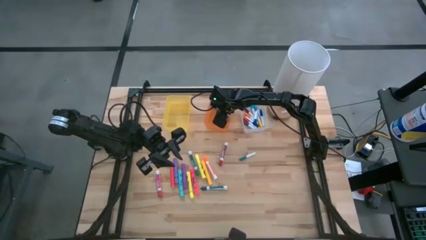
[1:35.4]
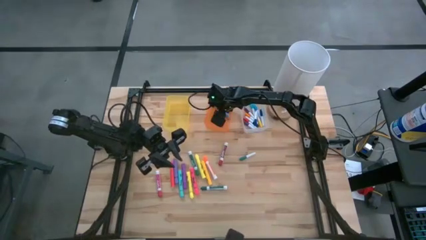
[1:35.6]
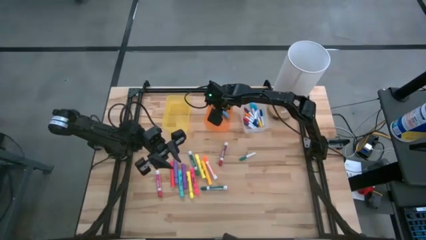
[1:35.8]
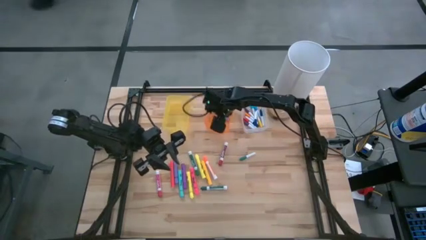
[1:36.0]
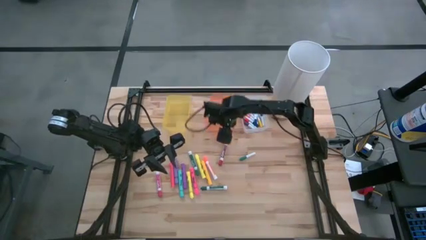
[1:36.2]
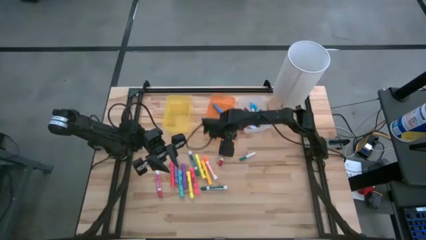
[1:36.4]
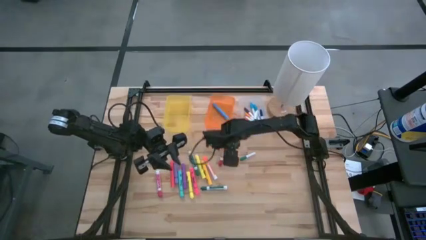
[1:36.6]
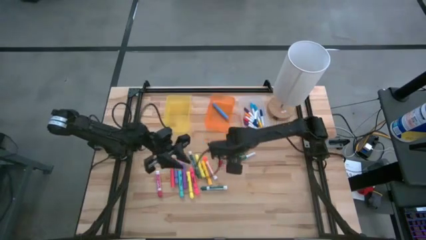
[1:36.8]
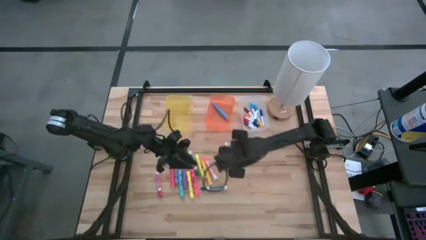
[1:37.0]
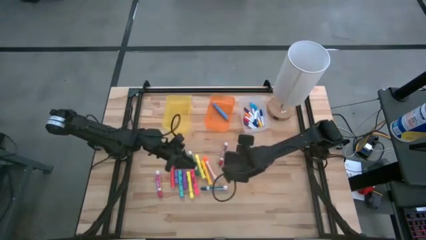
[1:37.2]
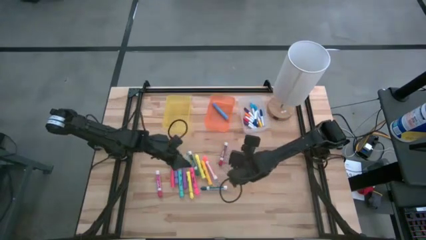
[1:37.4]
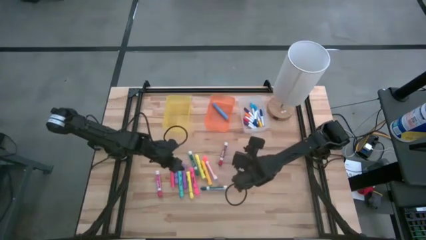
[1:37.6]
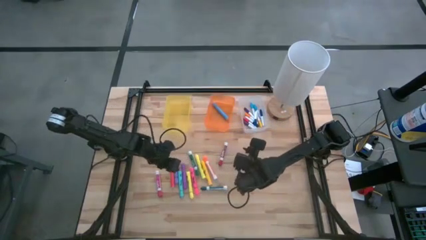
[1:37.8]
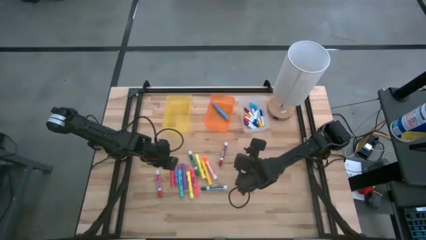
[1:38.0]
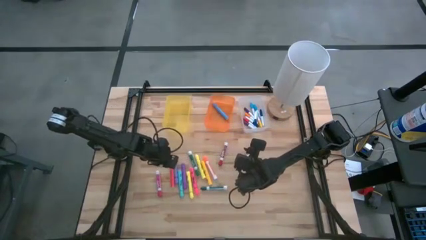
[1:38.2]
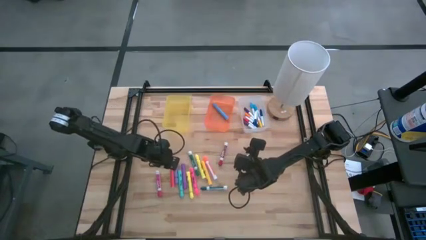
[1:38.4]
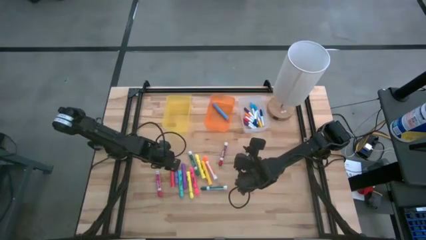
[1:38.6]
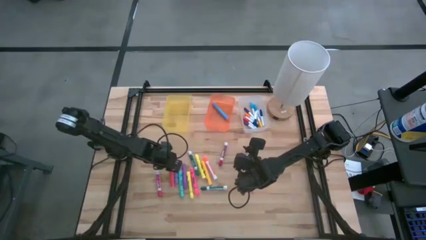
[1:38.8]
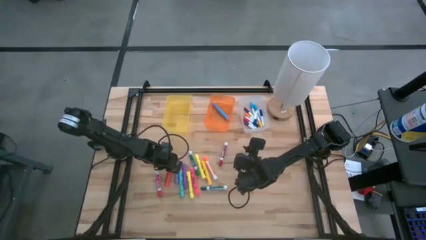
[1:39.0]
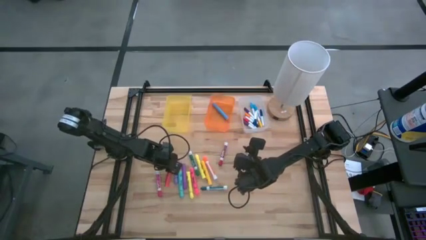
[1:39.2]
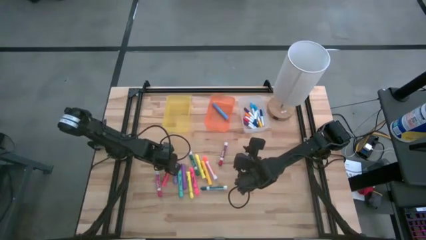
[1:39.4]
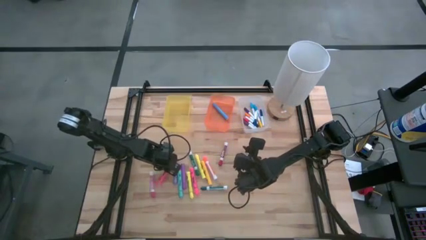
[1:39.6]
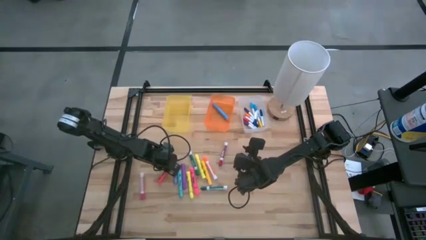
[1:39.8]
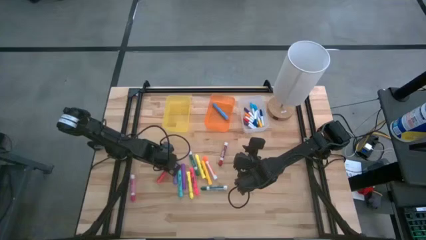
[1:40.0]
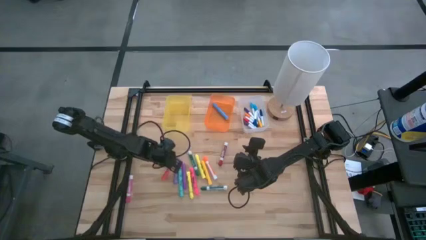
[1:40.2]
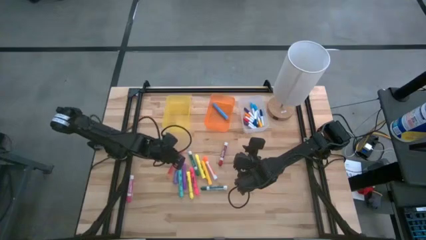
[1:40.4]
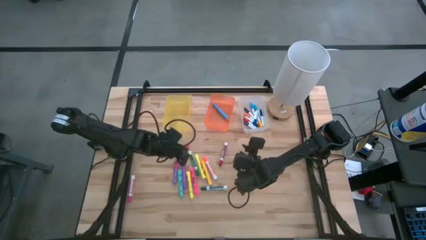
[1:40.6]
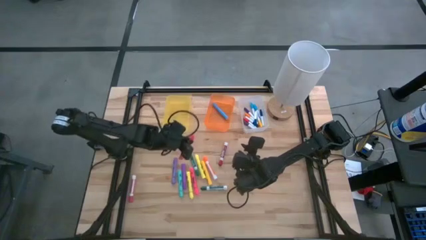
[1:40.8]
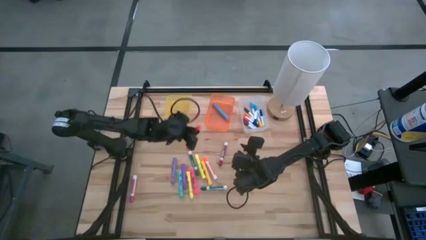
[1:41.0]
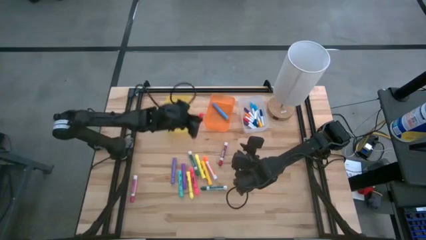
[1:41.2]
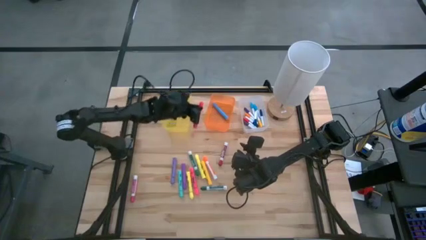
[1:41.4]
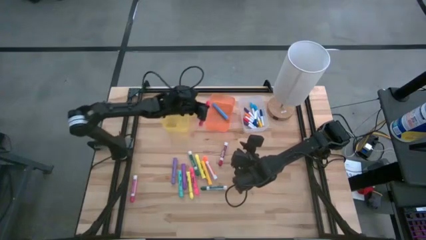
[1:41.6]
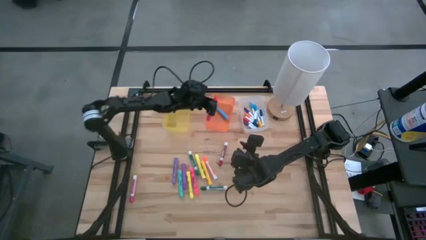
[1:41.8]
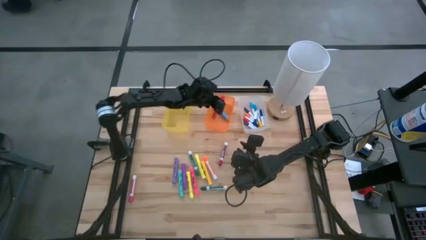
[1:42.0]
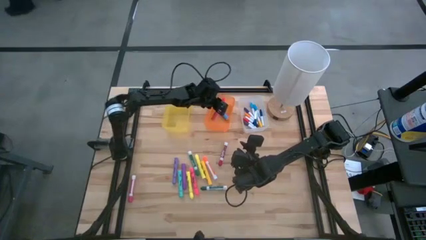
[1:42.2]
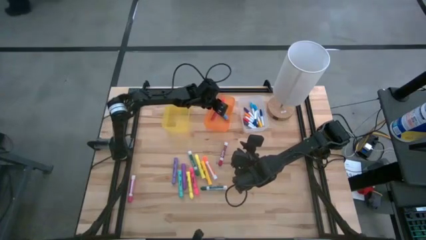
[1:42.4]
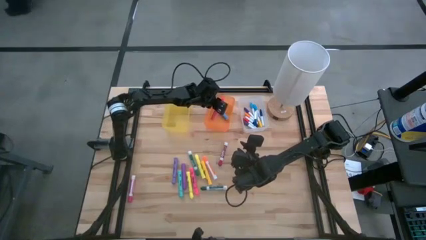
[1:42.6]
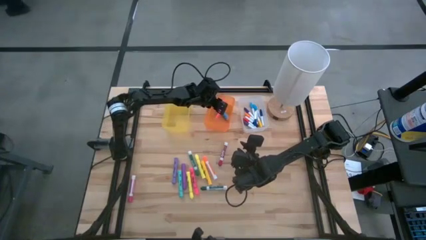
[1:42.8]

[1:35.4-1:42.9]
Task: Pick & Place Markers
Put the orange highlighter into the orange bin

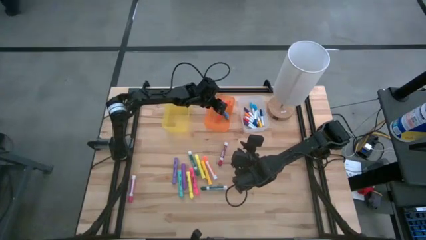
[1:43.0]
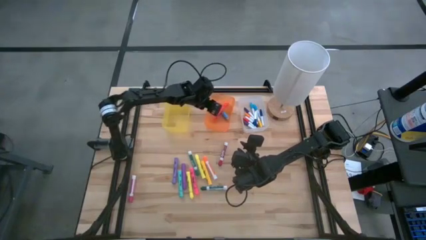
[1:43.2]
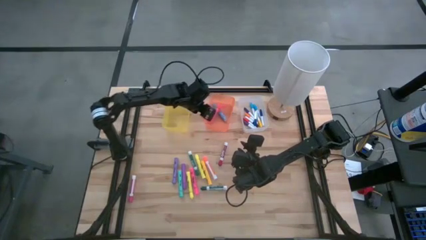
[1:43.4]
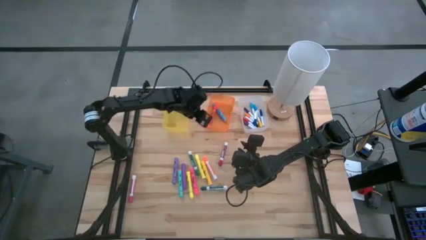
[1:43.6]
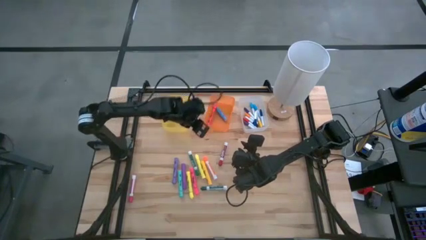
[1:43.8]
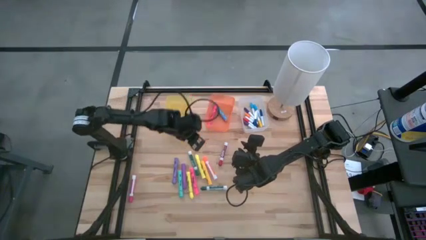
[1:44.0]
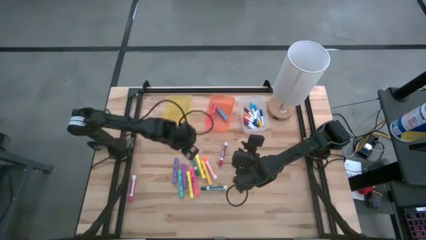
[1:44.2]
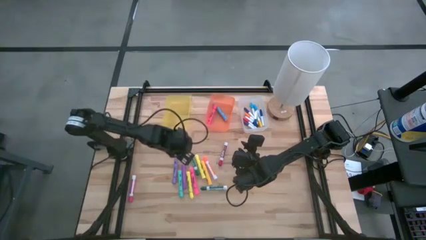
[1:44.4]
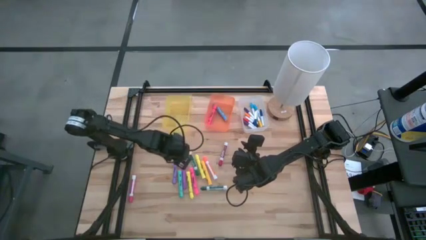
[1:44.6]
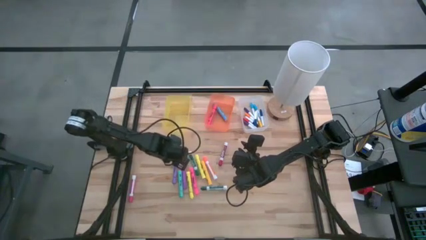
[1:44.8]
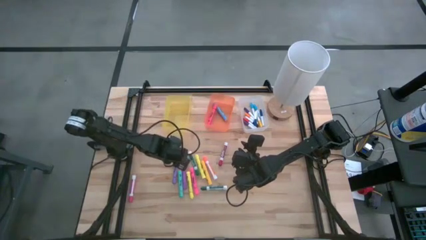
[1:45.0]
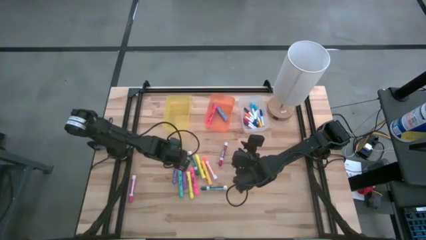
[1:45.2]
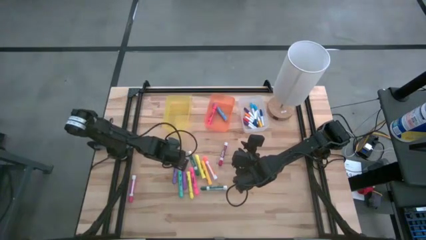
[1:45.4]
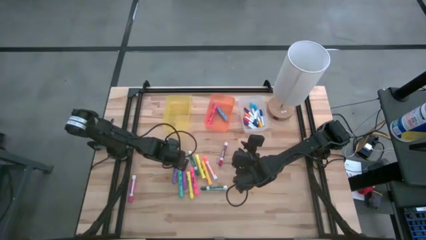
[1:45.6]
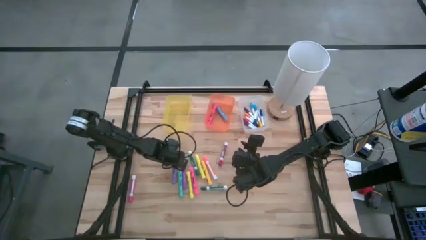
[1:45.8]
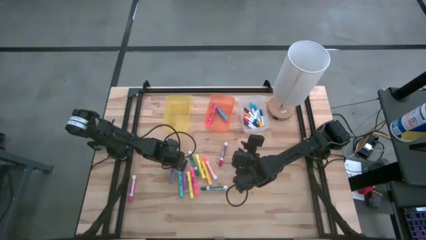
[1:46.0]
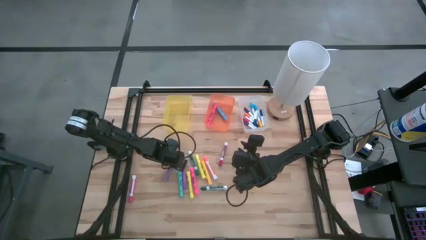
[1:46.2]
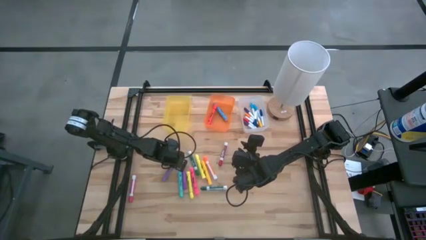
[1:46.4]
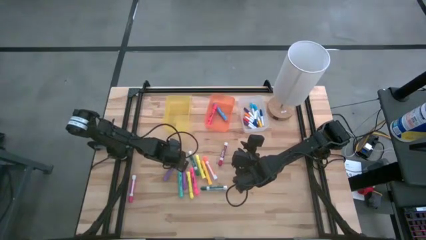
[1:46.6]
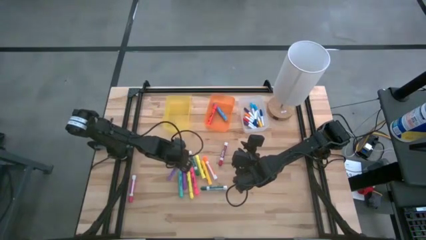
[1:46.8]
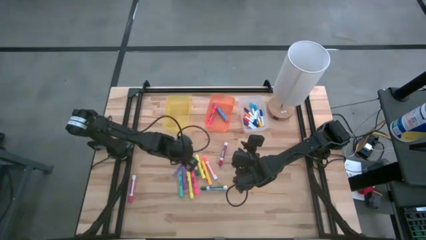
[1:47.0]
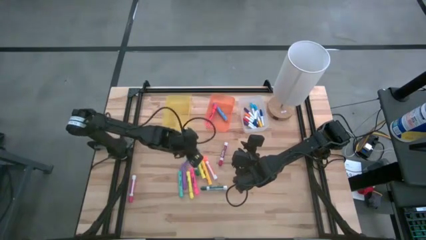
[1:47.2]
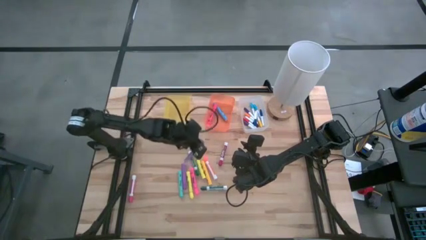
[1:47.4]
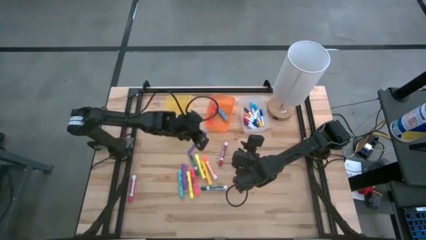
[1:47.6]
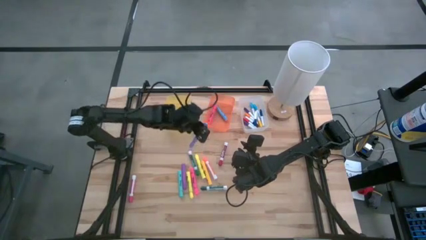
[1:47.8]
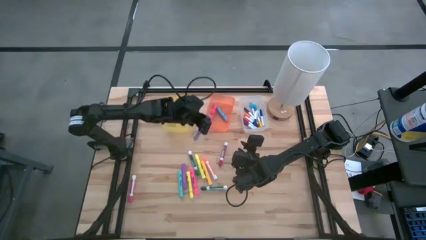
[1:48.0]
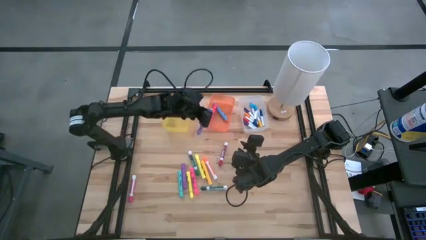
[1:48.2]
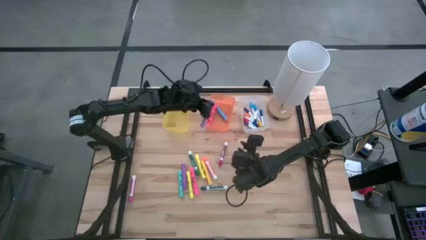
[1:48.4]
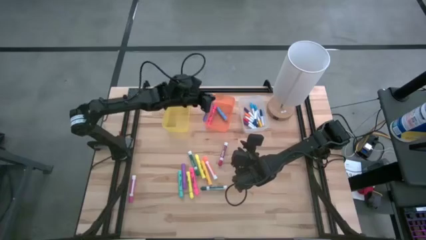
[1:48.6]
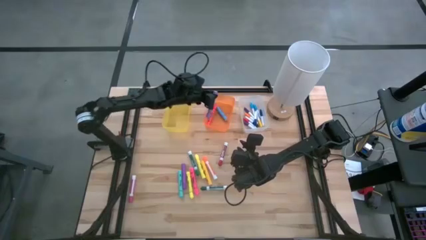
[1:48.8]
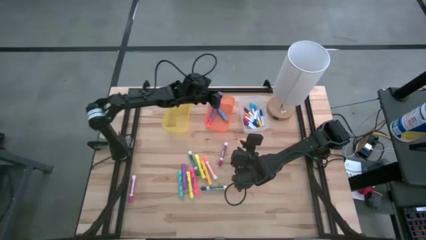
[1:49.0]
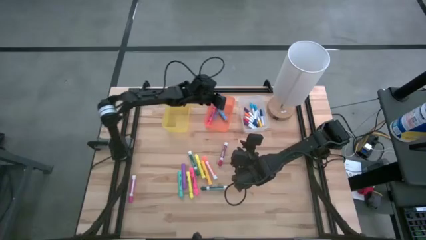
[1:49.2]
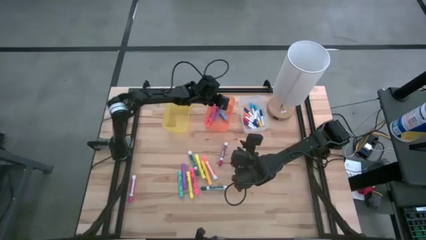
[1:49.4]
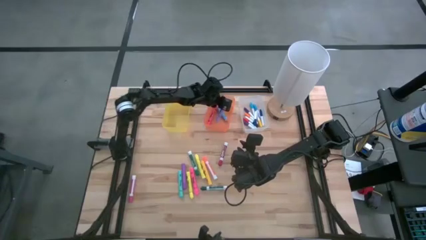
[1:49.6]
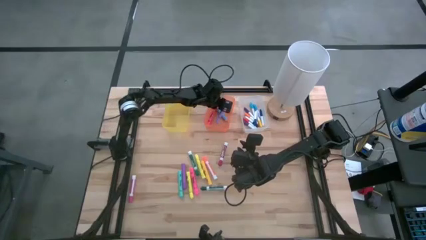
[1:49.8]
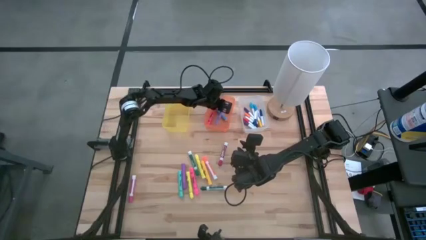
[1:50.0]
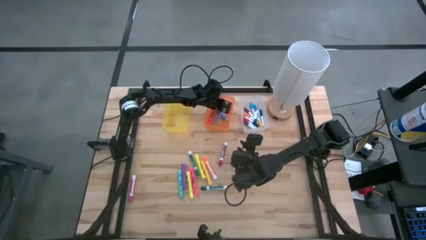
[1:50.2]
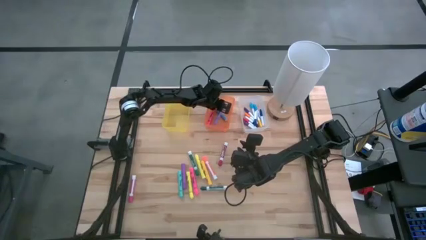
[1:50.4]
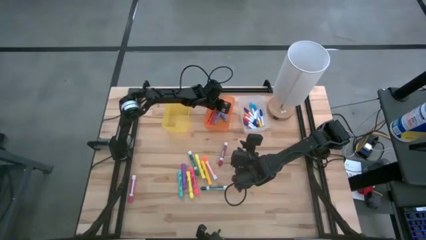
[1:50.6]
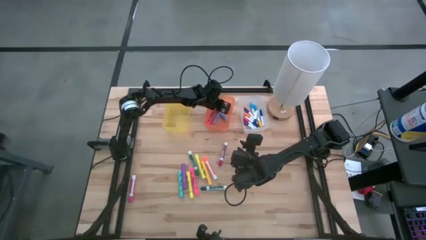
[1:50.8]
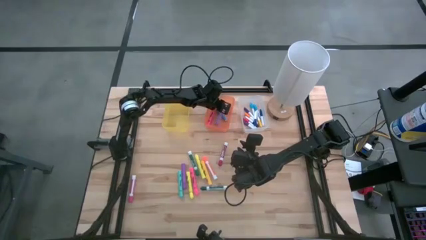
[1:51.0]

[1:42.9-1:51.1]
Put the left purple highlighter into the orange bin

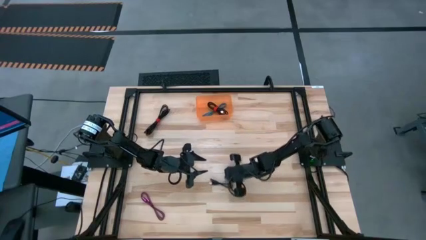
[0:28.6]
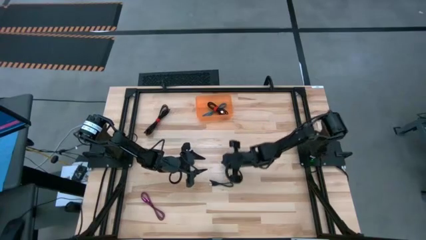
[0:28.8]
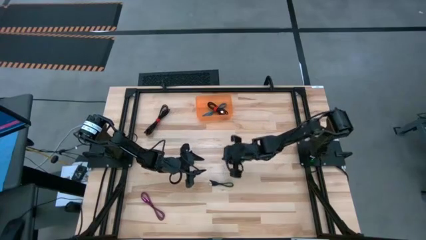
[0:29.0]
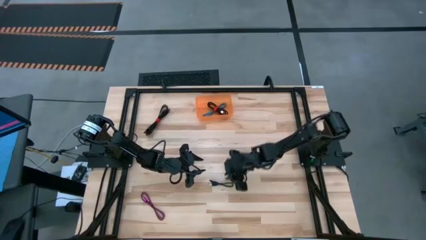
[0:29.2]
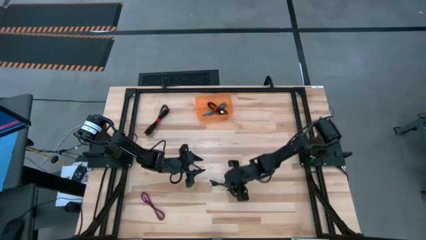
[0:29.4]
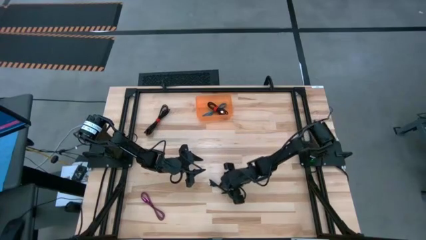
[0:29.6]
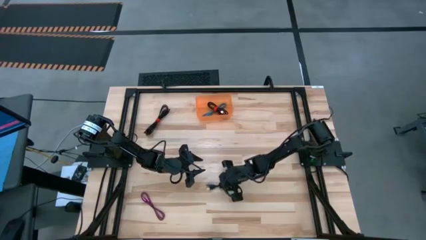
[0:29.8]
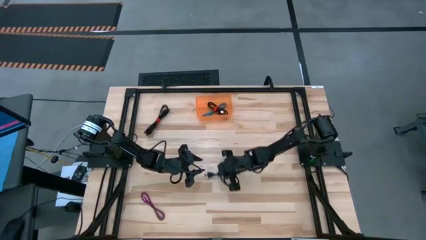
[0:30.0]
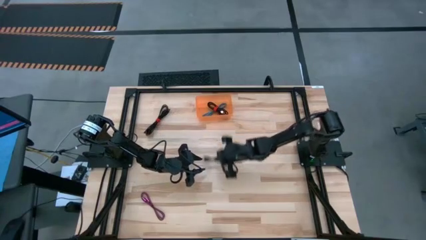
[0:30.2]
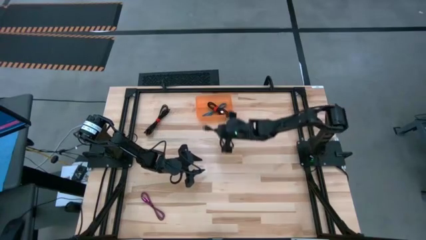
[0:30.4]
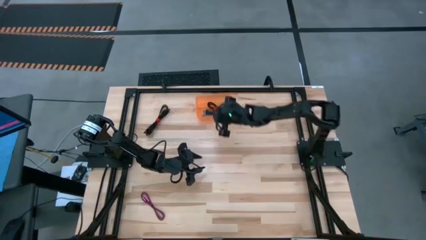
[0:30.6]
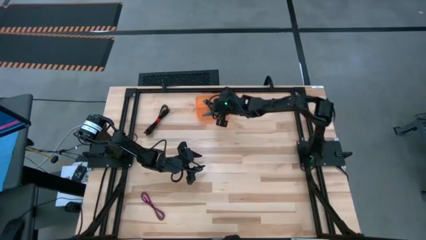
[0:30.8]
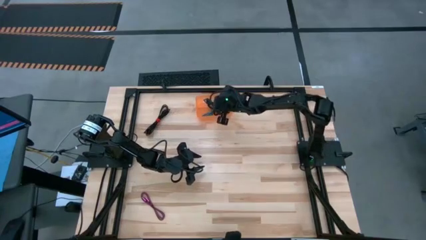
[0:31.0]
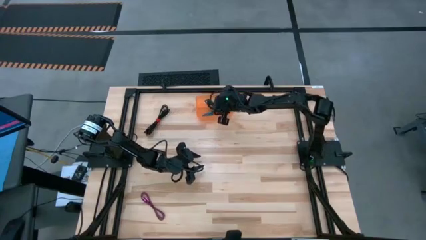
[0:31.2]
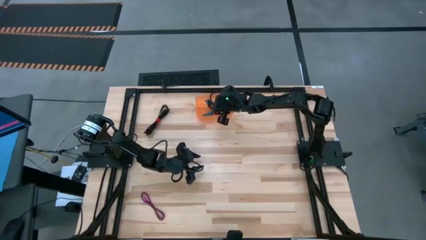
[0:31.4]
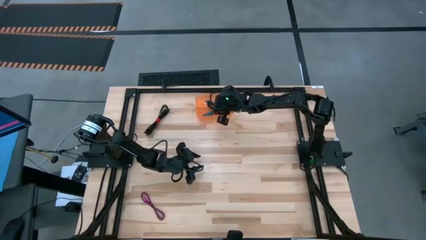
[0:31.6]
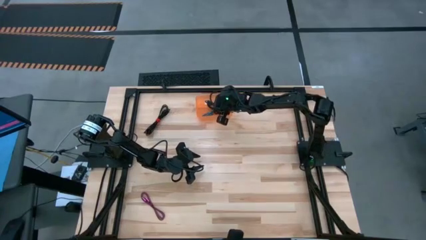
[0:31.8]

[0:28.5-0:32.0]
Task: Pick and place USB-C Cables
Put the bottom black charger cable into the orange bin
